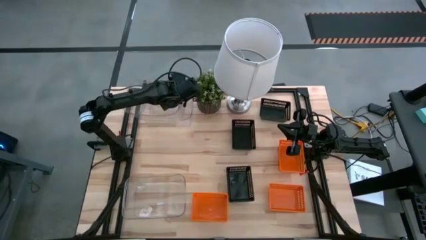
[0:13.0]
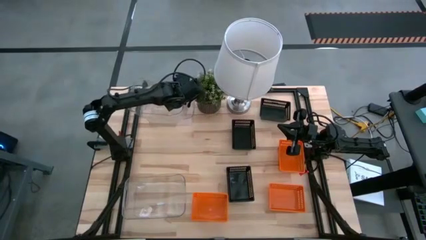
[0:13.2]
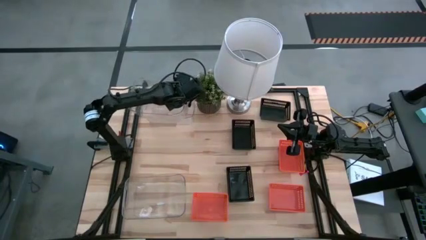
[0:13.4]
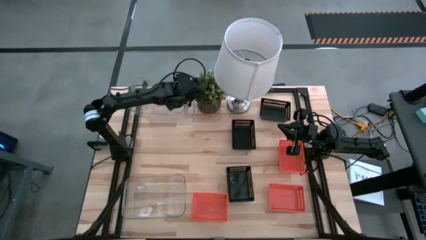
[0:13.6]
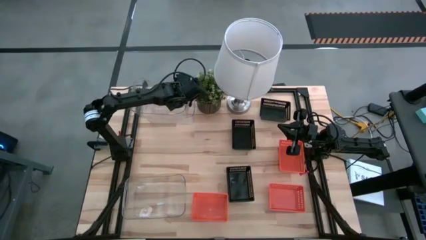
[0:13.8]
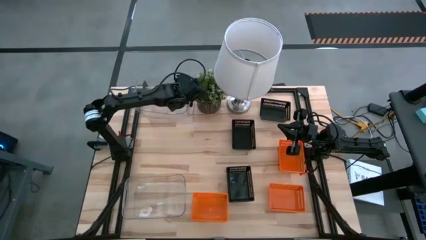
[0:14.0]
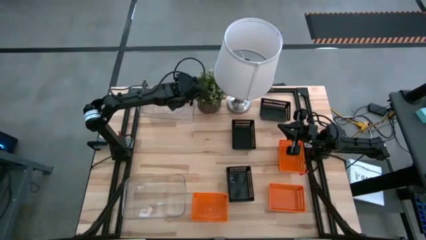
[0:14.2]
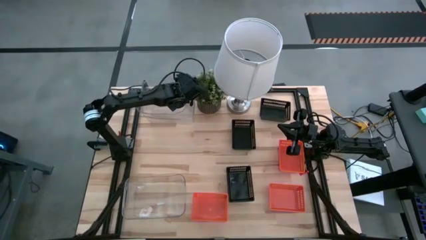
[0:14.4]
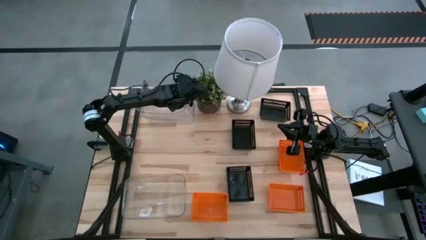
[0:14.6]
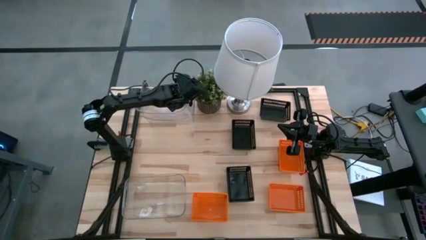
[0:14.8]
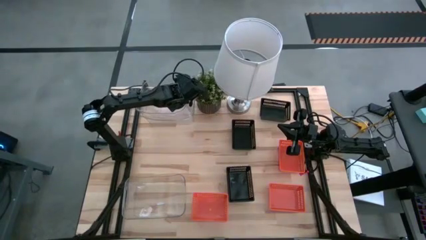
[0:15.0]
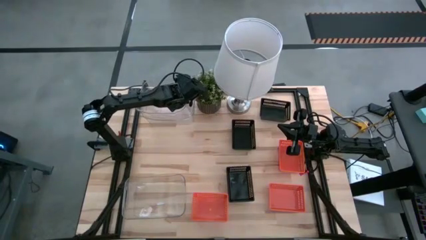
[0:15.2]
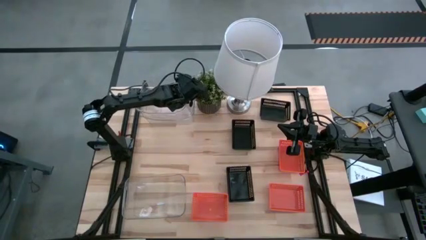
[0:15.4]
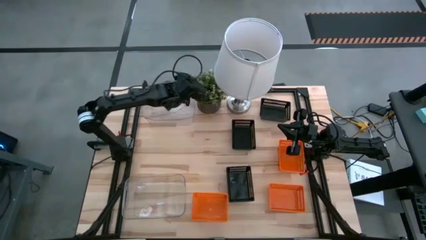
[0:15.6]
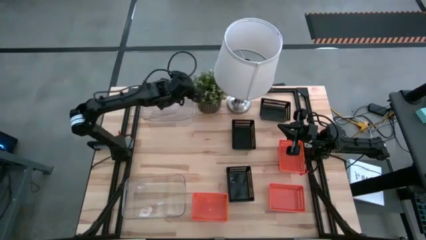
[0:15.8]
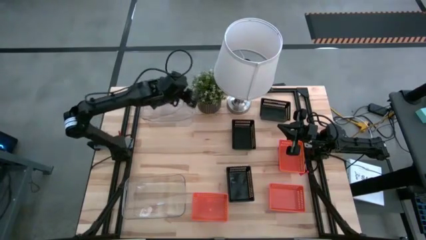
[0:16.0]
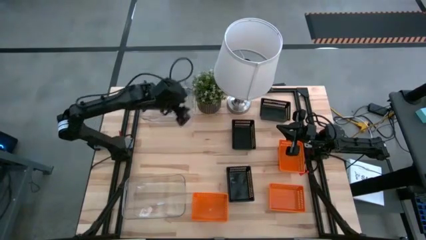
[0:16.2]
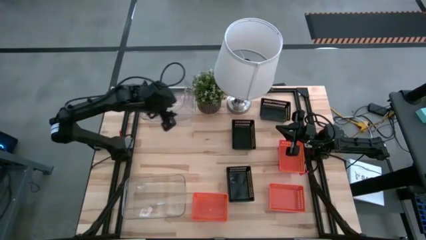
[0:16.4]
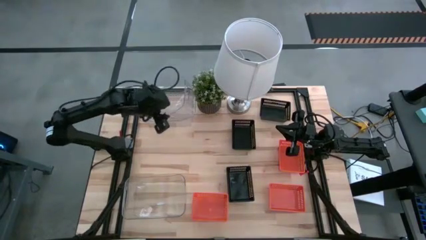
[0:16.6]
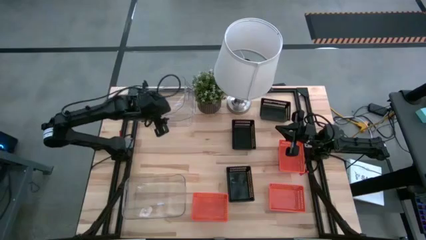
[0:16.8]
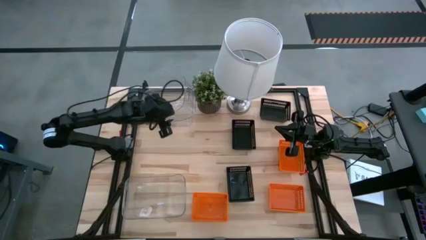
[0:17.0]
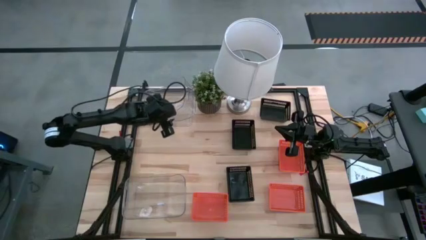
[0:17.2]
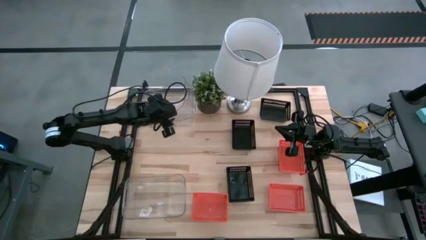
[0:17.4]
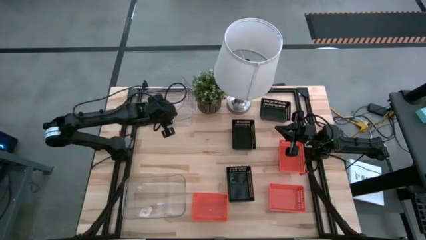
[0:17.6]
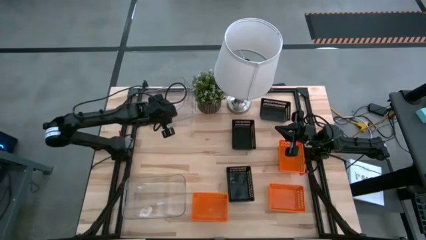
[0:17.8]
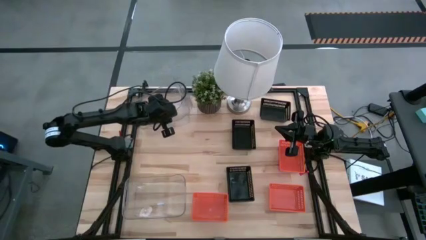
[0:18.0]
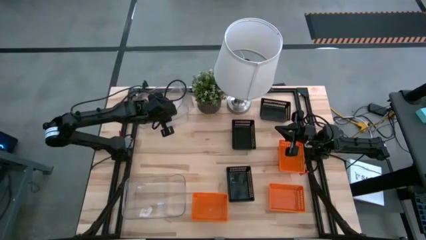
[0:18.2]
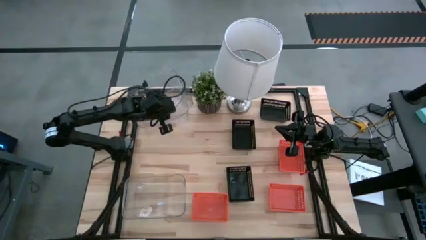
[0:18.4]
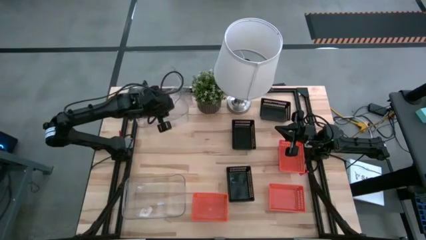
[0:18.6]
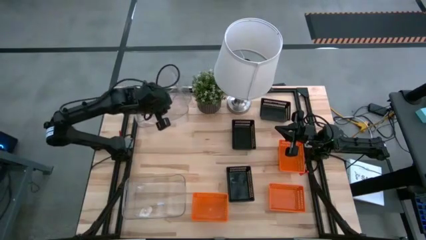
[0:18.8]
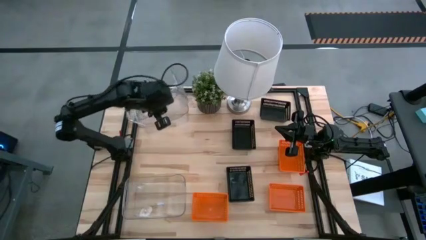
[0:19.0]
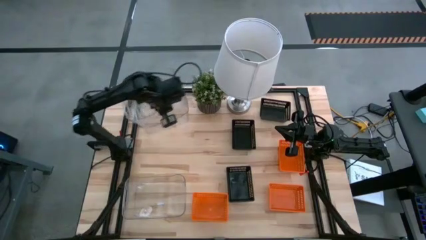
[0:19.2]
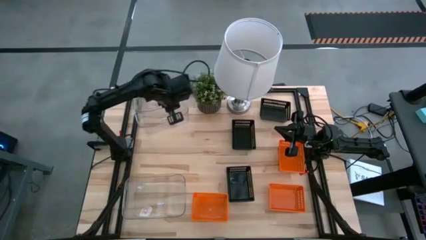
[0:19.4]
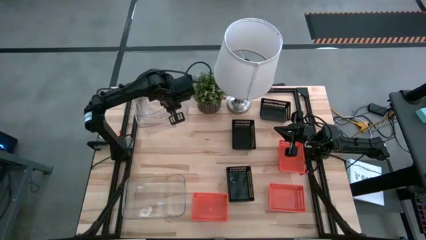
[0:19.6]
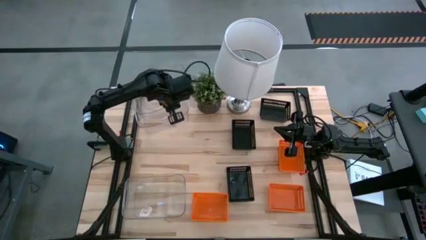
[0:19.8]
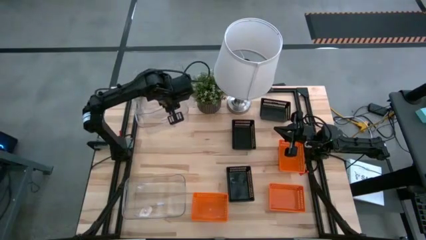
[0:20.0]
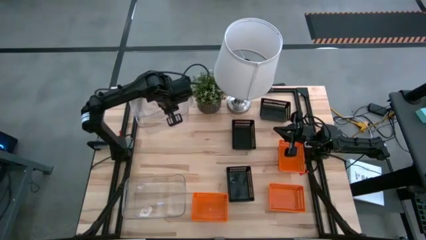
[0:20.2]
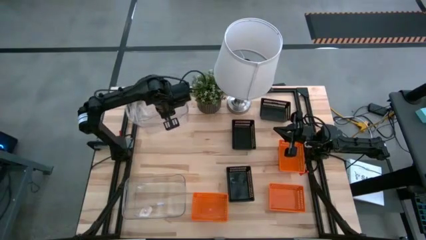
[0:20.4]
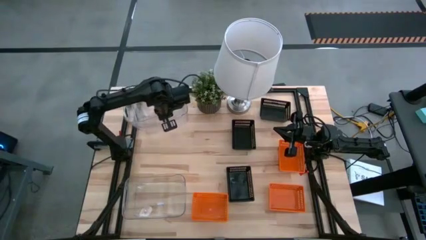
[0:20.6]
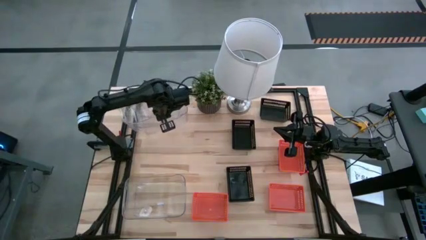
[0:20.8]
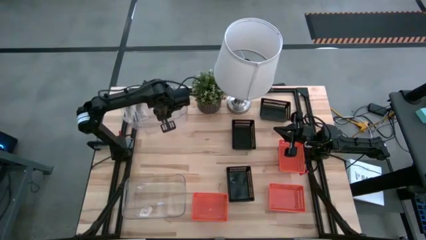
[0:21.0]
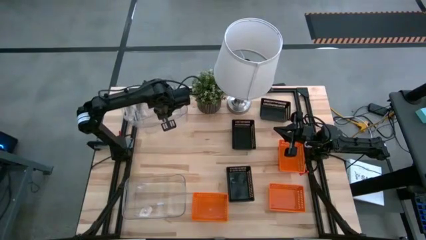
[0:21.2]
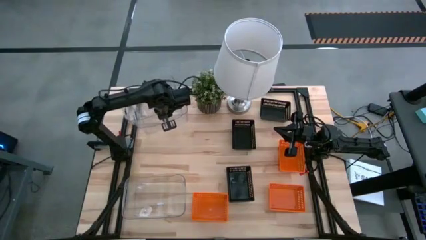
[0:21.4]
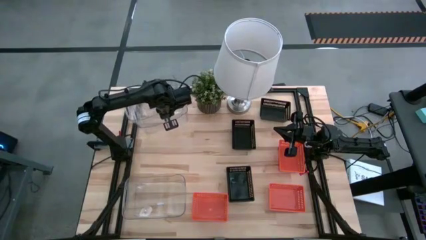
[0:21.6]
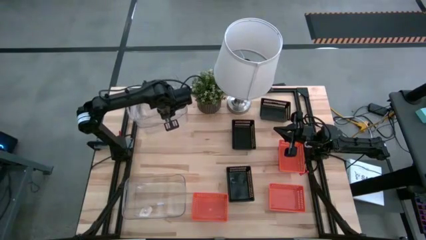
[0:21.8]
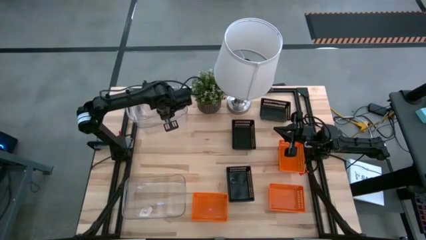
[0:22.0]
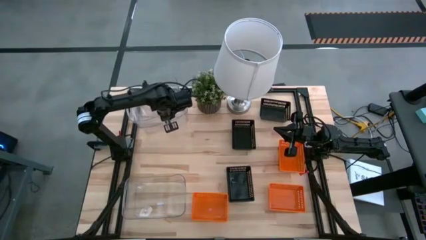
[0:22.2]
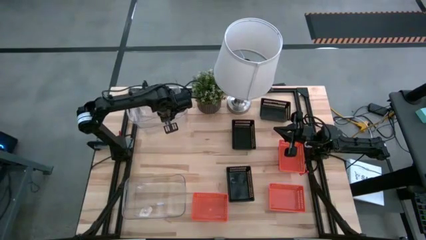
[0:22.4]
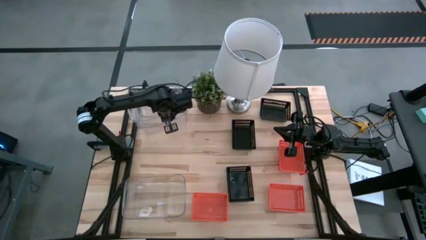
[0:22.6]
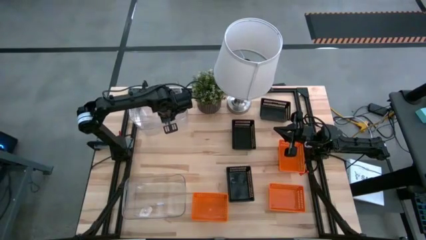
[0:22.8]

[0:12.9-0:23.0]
Stack the middle transparent bin into the top transparent bin

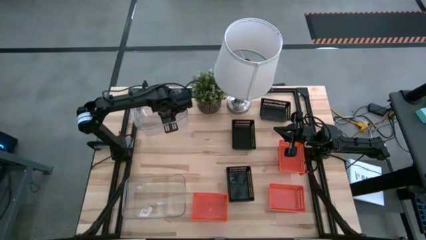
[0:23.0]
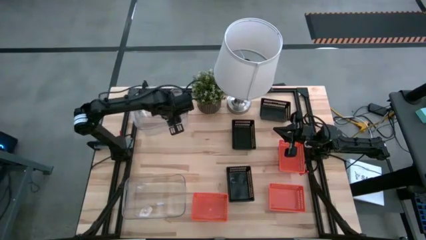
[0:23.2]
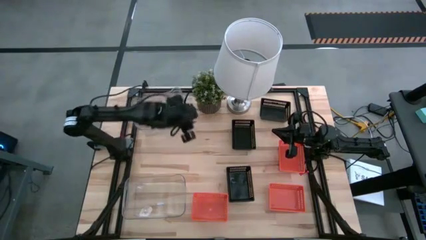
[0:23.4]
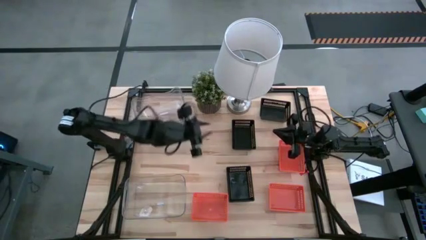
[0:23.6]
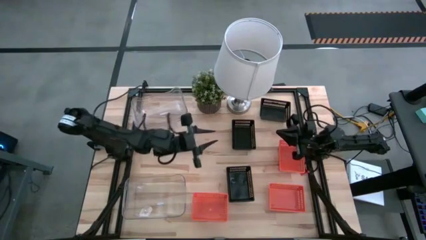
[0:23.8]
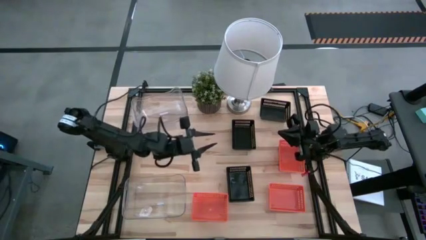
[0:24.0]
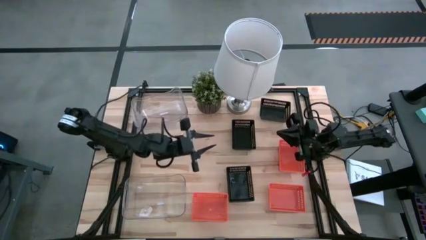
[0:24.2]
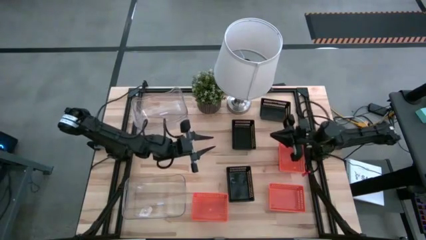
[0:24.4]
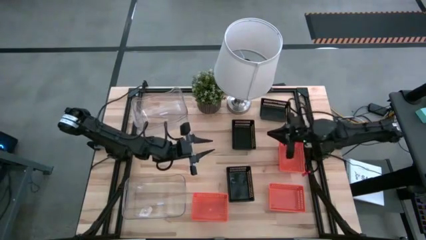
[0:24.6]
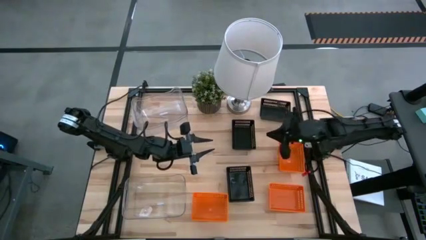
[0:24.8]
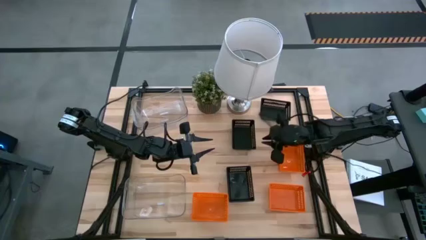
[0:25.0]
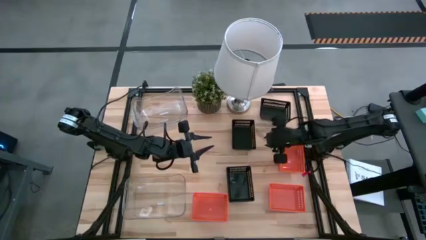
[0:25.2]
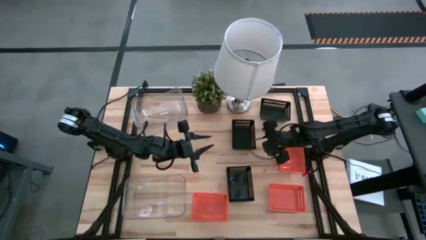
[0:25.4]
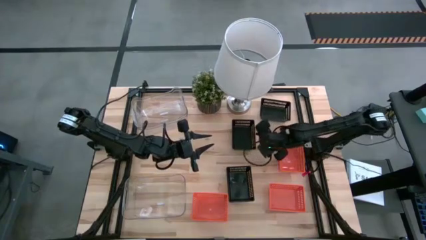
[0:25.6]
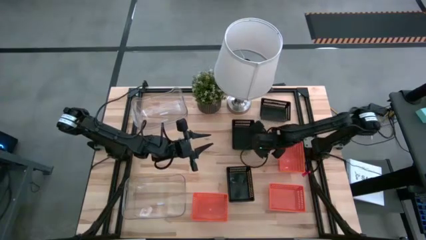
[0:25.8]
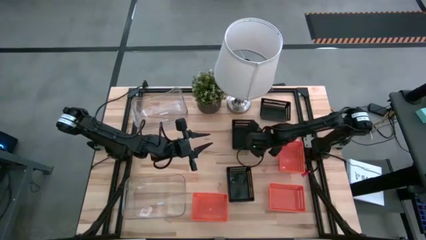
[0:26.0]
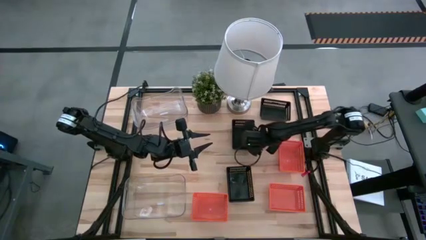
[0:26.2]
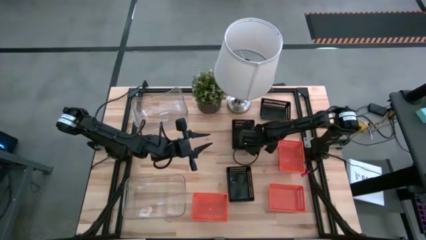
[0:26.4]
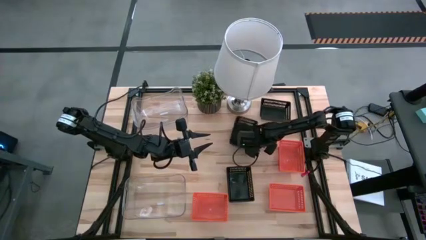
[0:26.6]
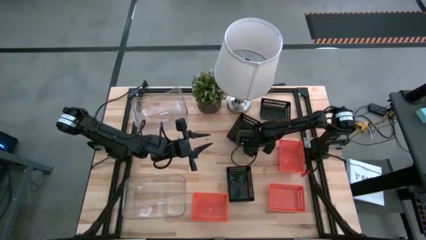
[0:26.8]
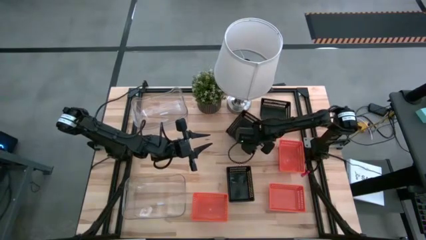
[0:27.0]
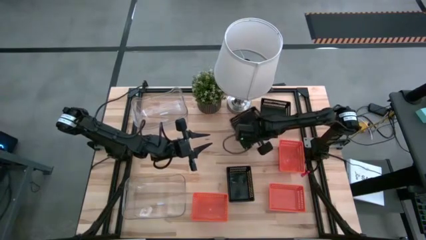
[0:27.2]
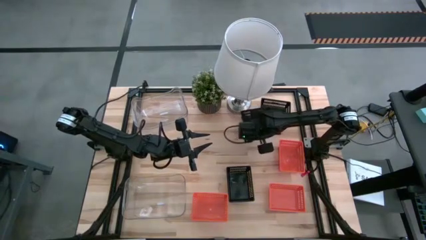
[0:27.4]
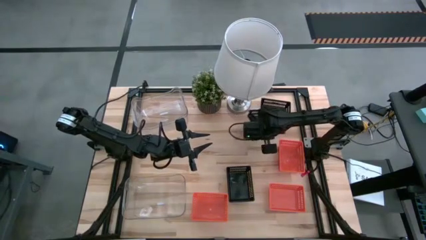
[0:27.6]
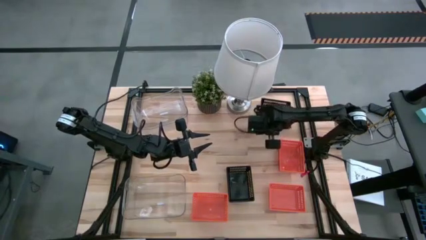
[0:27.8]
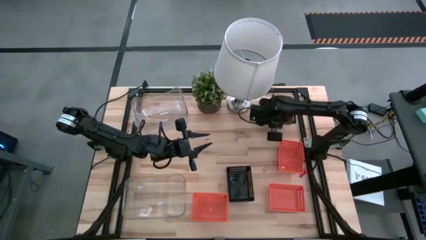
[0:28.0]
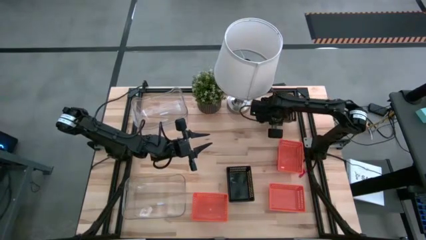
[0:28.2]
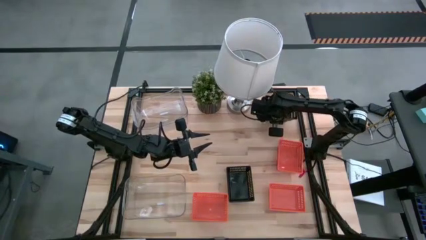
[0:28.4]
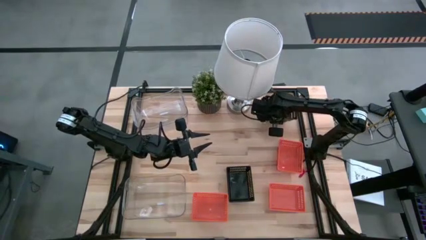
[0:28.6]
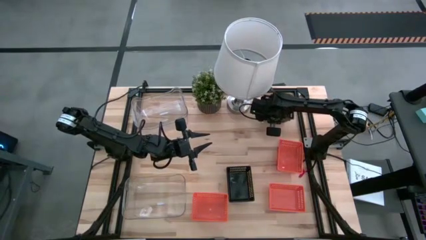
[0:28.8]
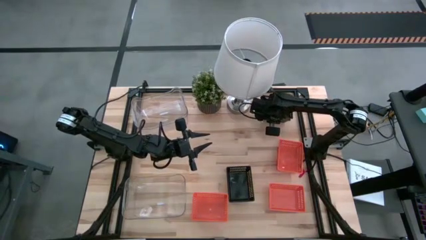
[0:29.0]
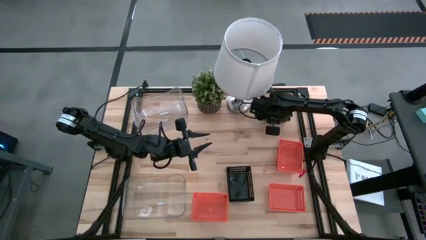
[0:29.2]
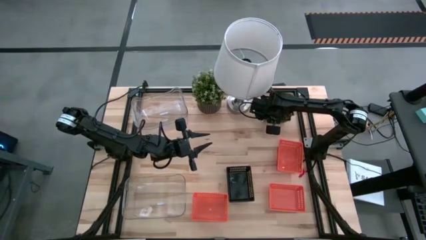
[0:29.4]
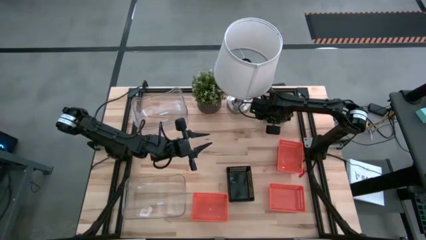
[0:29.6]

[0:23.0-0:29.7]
Stack the middle black bin into the top black bin
